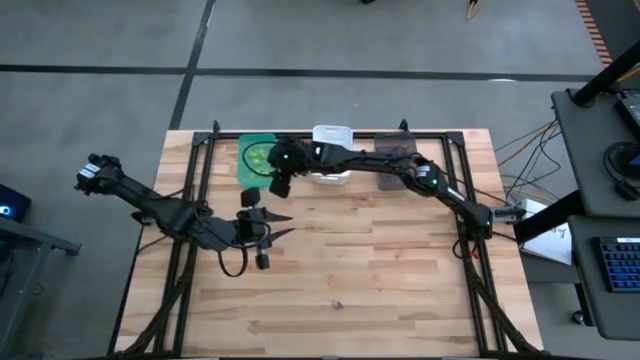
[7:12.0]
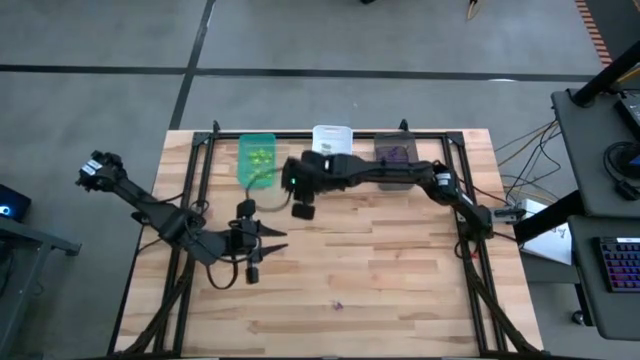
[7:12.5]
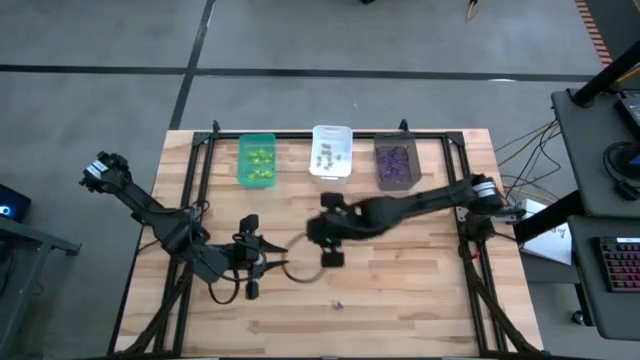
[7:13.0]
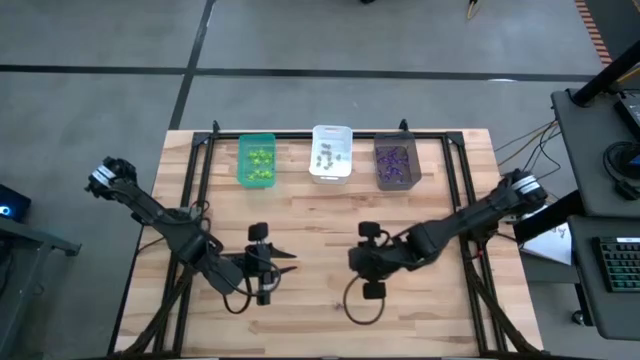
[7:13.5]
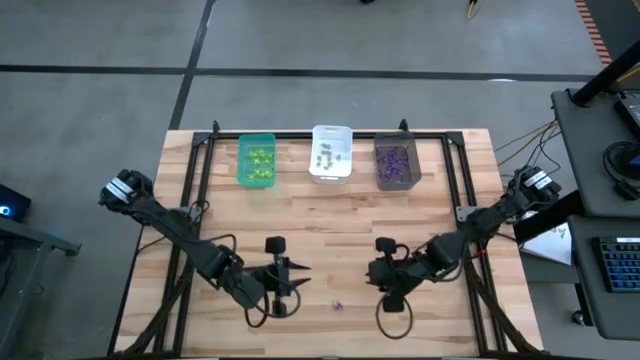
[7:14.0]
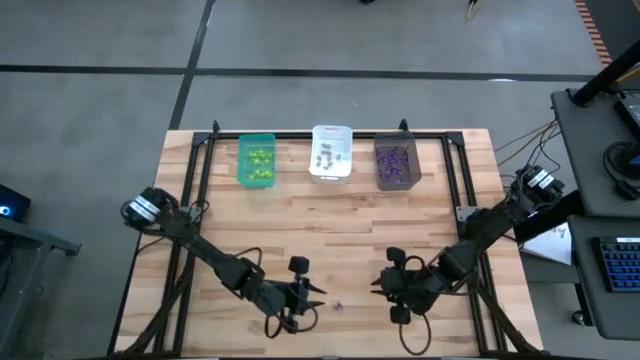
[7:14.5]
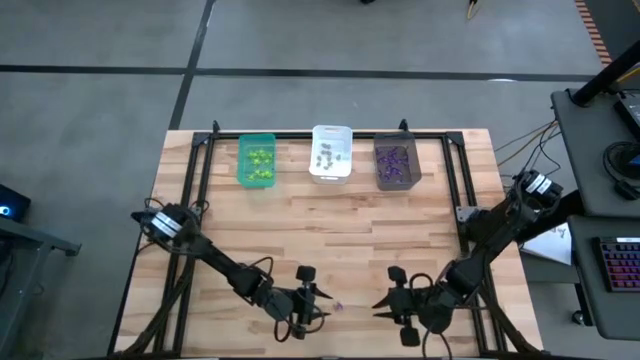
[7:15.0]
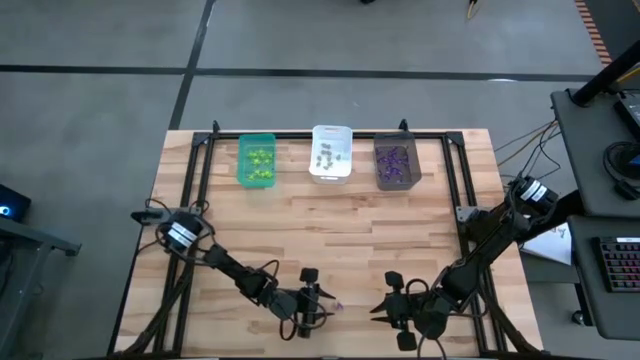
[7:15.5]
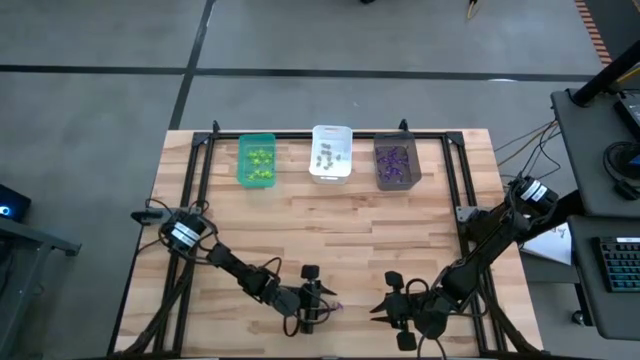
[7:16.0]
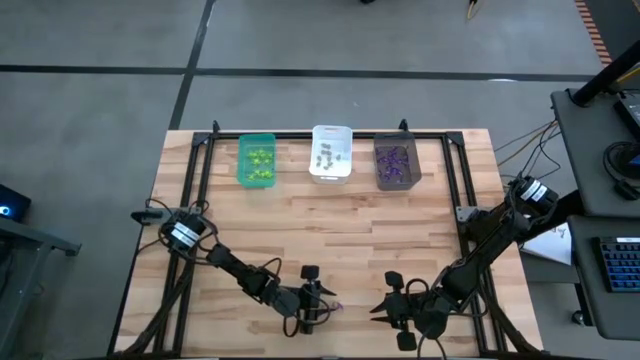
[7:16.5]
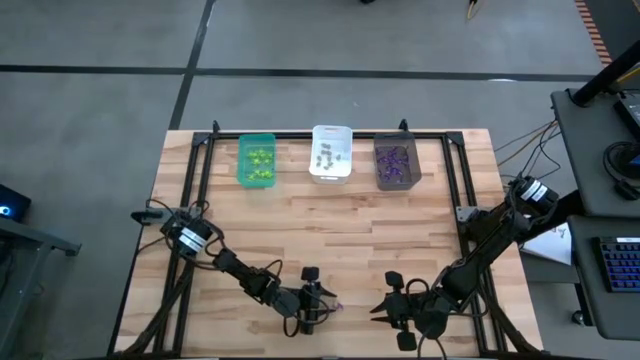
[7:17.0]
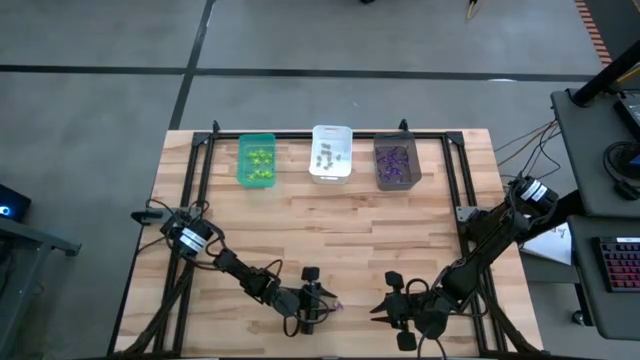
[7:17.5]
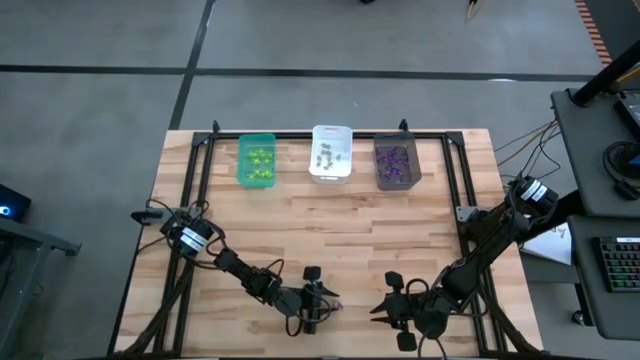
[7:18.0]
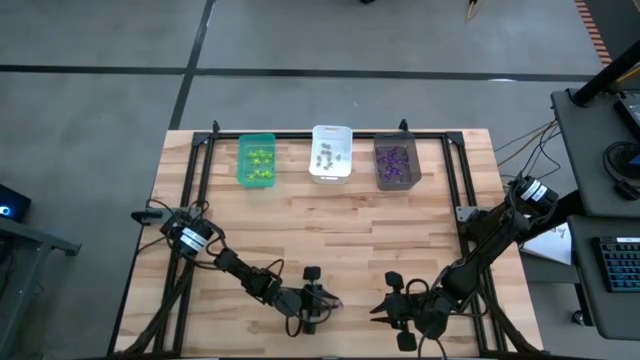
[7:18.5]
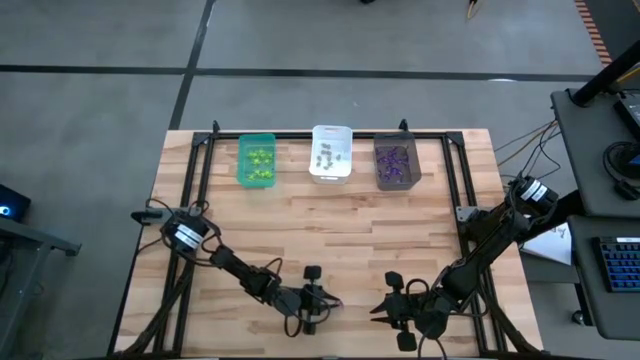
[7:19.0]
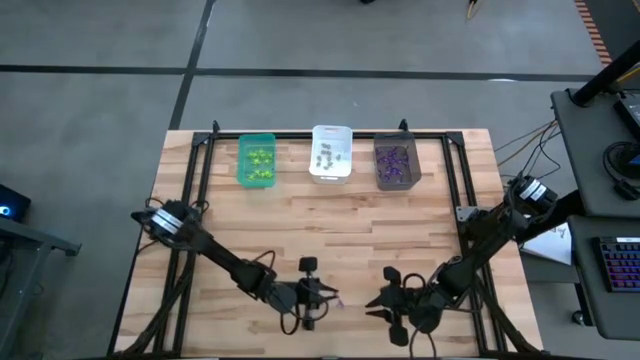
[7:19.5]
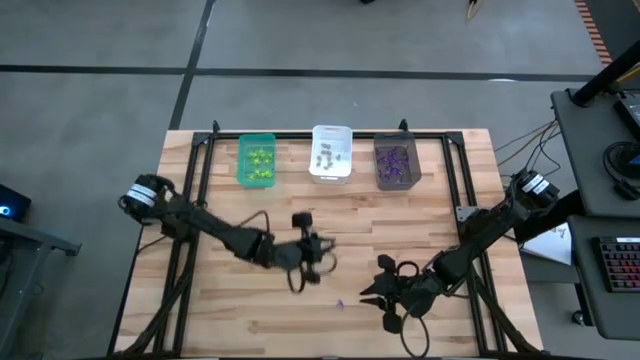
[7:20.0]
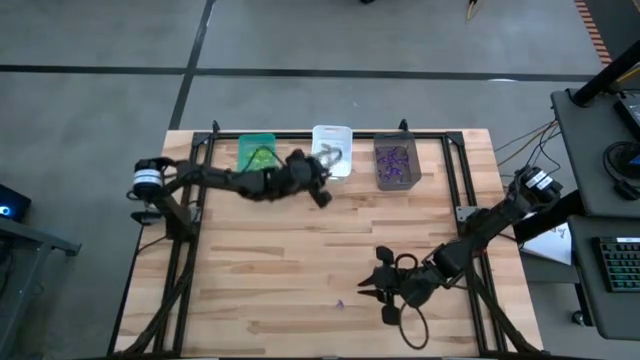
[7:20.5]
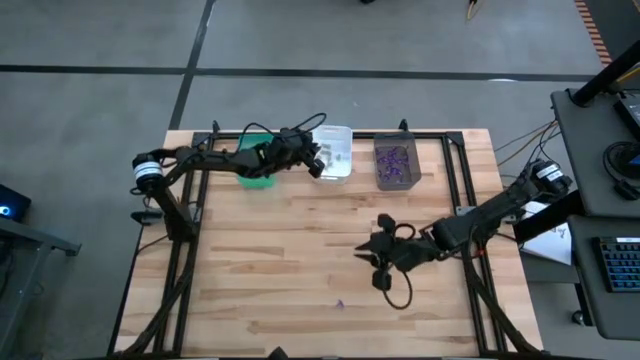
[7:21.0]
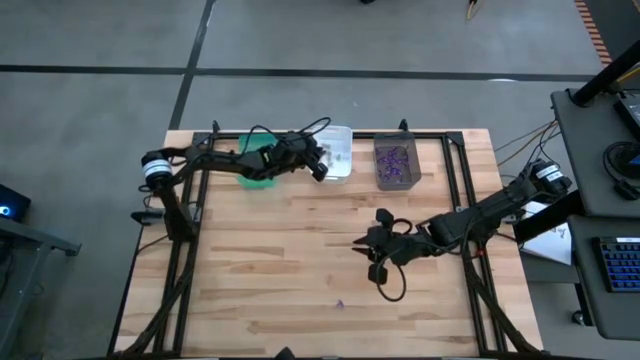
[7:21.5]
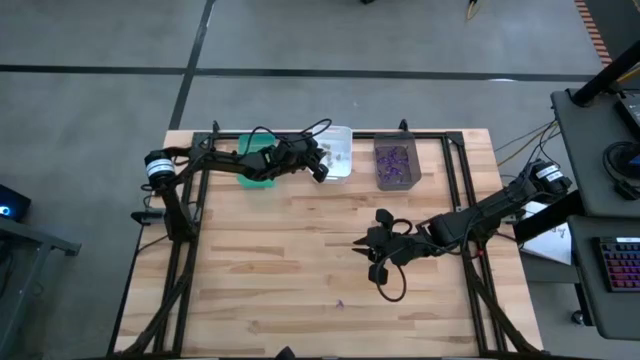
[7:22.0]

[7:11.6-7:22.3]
Task: Sort Halloween decoration
Put the white skull toy into the white bin

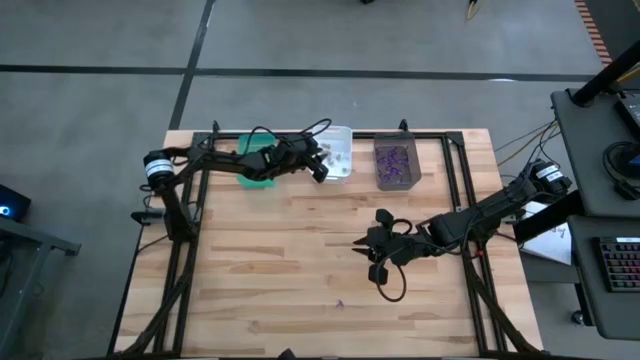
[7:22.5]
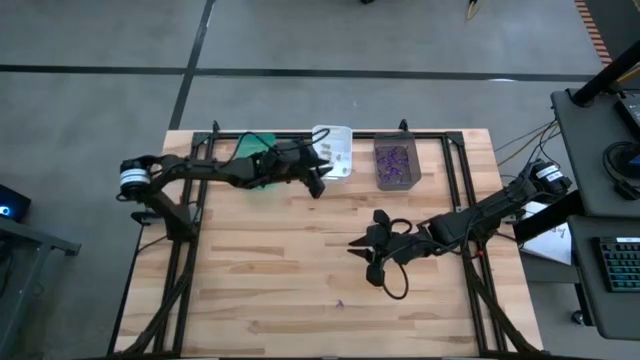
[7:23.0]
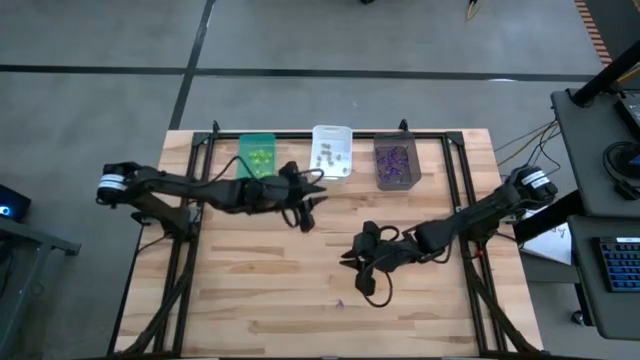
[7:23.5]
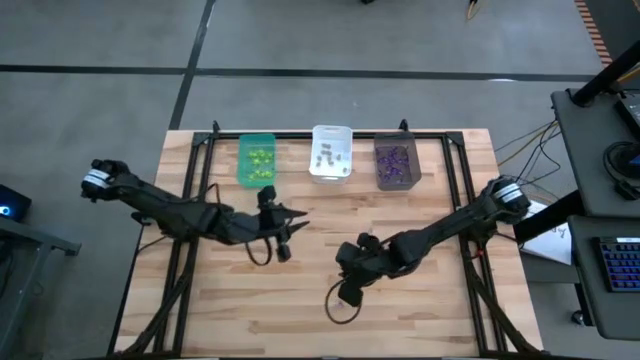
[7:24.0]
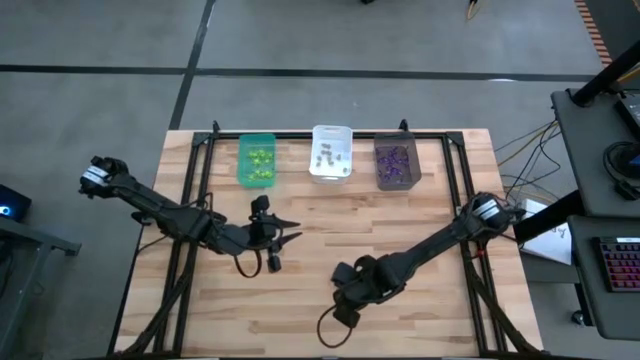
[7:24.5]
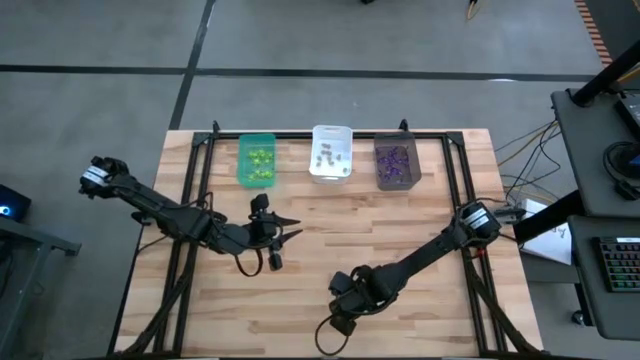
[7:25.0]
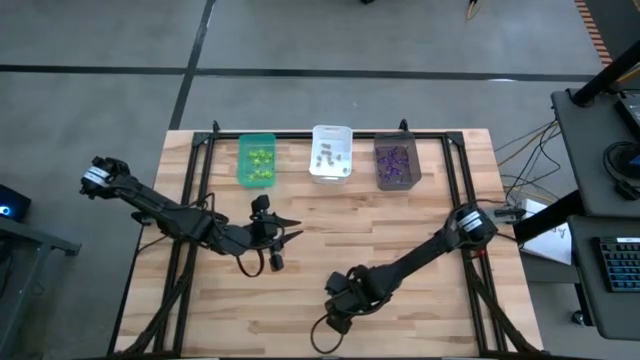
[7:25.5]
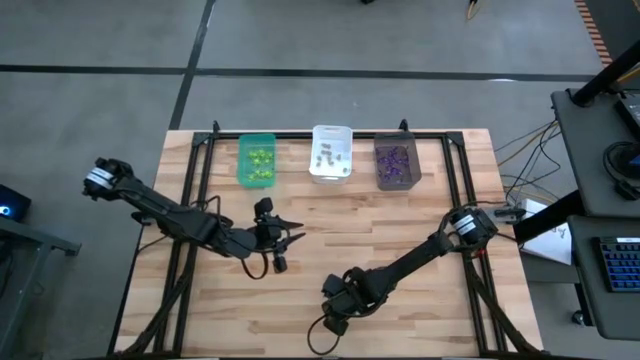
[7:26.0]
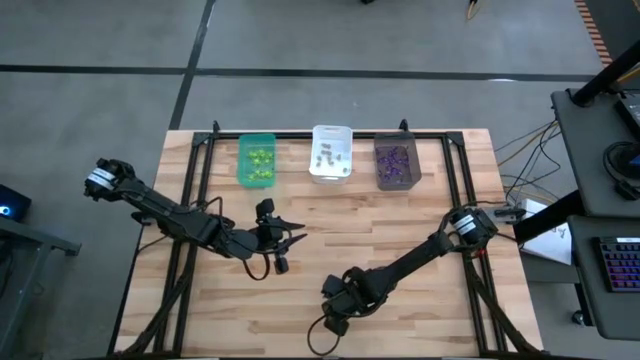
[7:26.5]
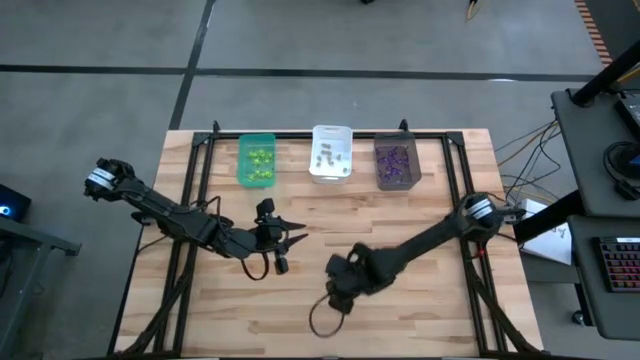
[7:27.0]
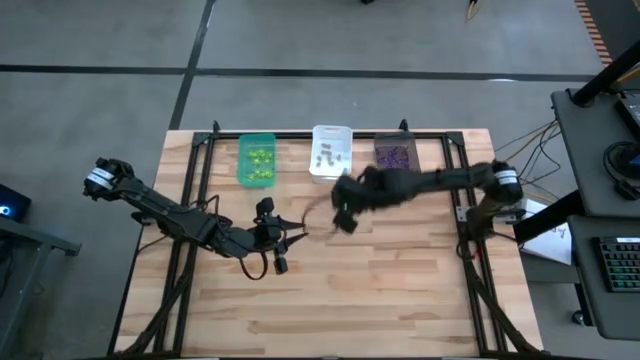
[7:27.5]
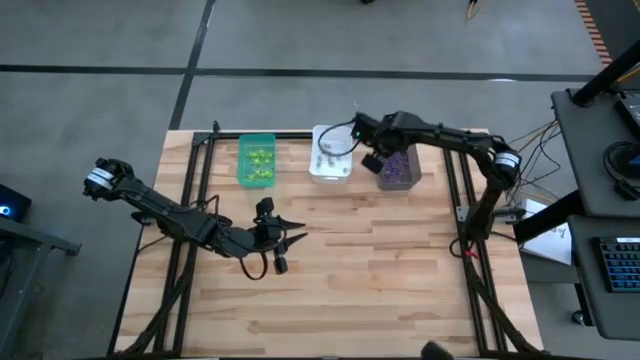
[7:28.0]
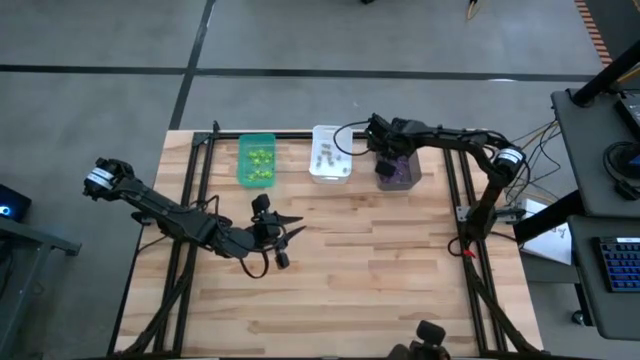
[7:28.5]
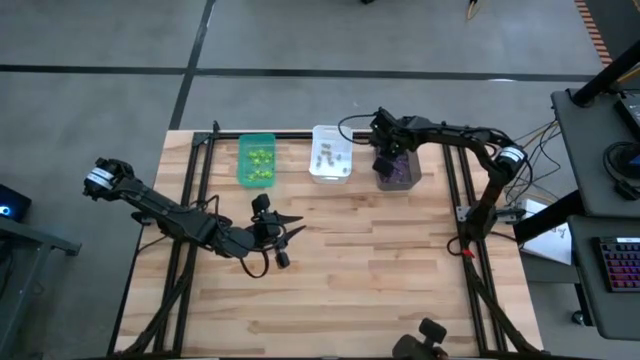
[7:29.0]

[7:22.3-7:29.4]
Put the purple witch hat toy into the gray bin

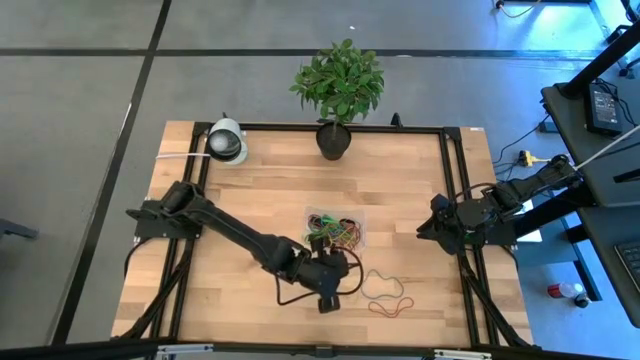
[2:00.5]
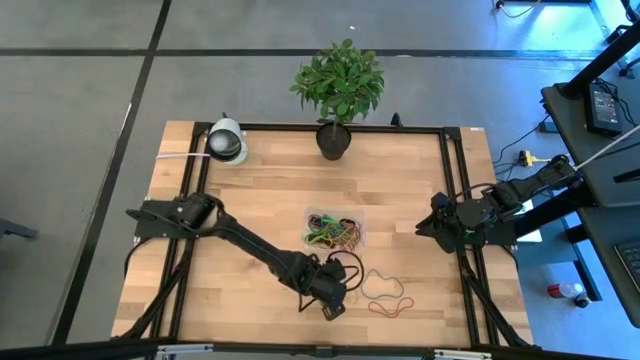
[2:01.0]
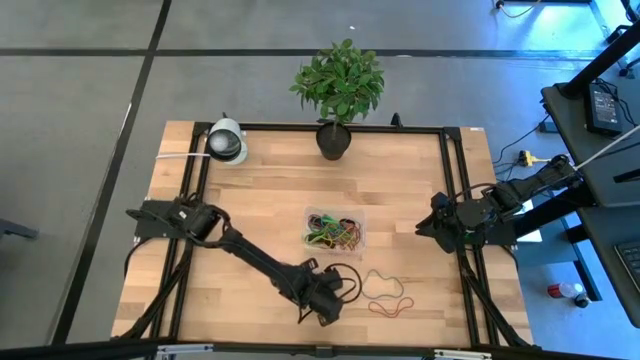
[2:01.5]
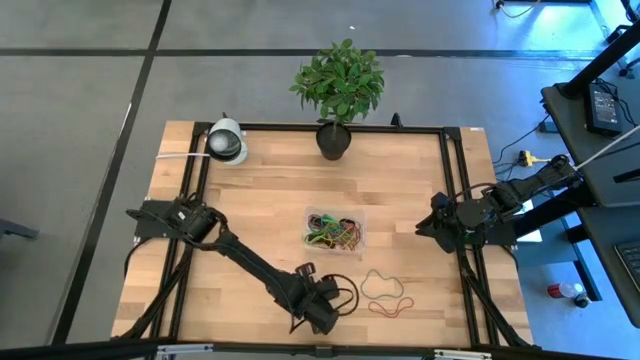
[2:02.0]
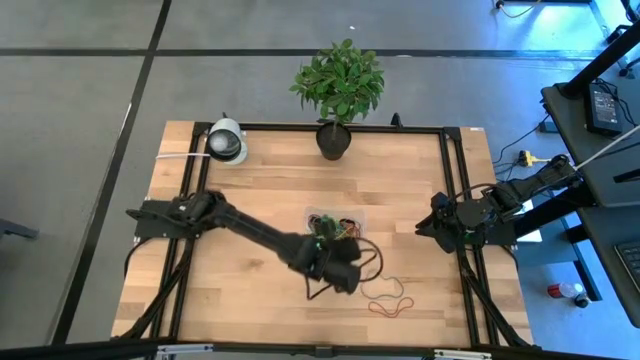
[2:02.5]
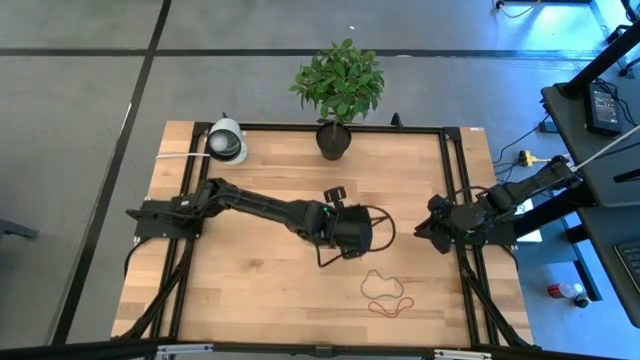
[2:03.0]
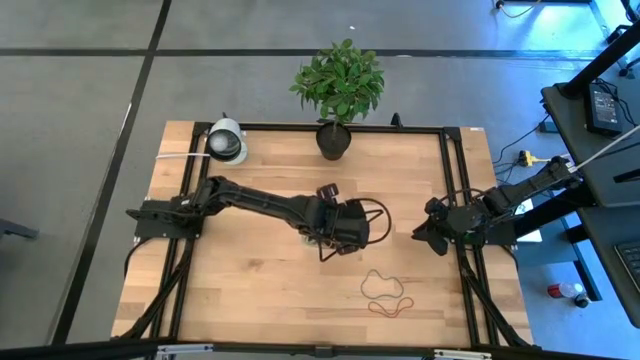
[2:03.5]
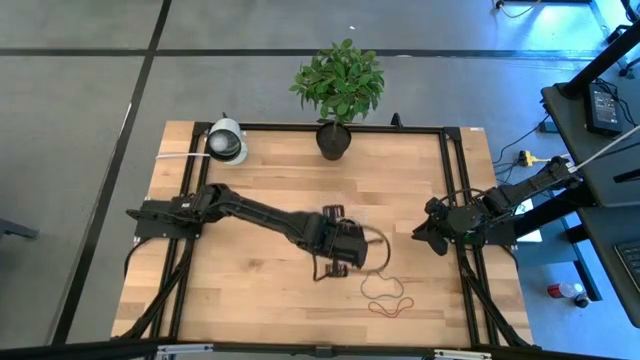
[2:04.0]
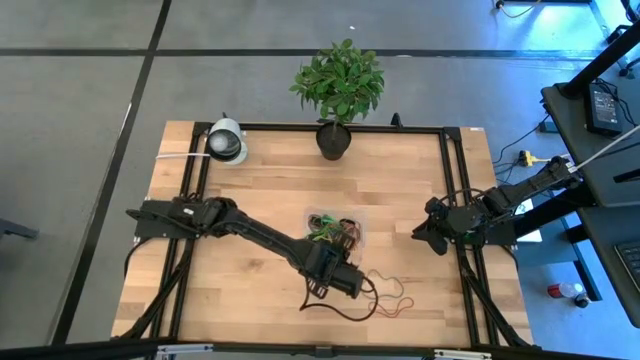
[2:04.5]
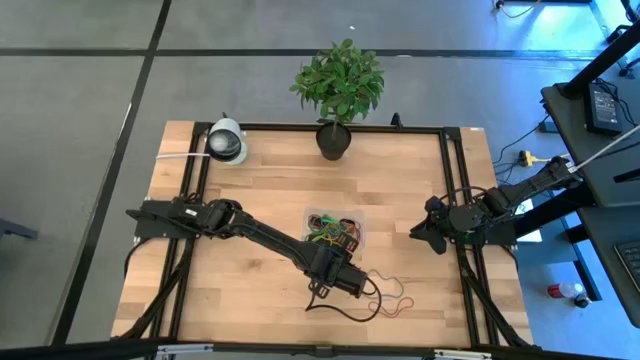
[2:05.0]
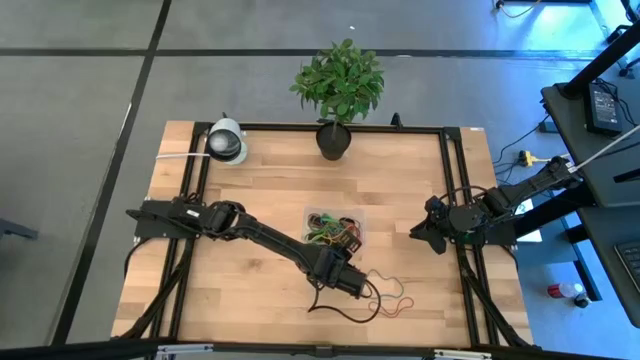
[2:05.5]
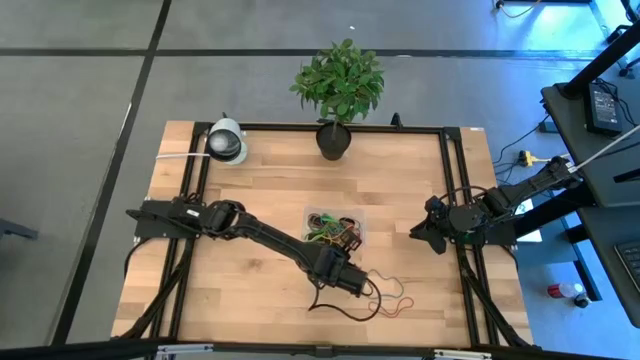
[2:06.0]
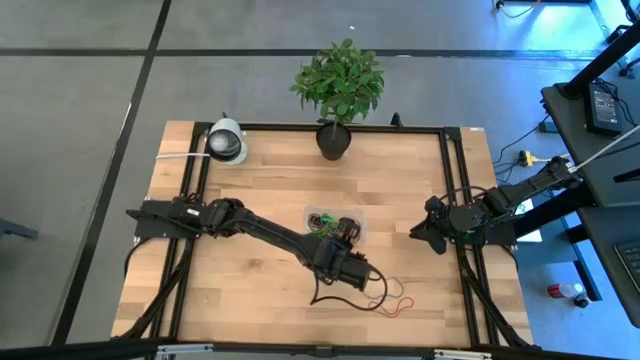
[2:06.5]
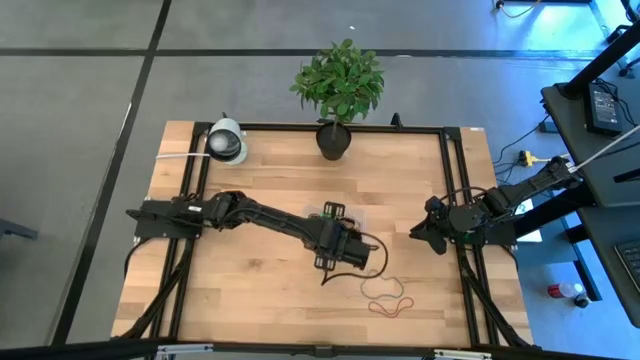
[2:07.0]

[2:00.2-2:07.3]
Task: Pick and place rubber bands into bin
Put the yellow rubber band into the bin
